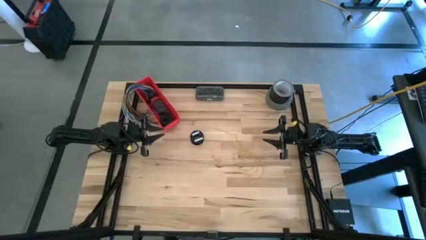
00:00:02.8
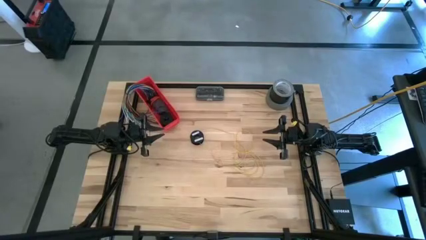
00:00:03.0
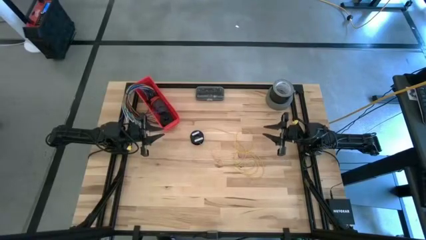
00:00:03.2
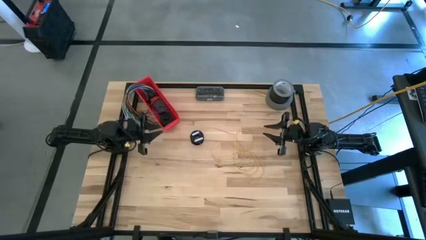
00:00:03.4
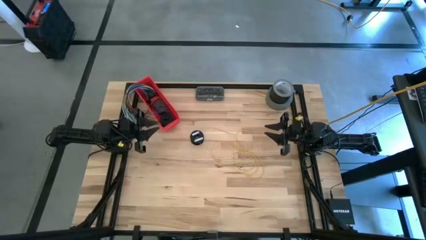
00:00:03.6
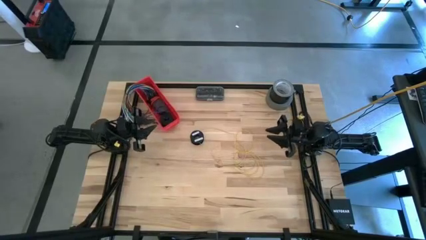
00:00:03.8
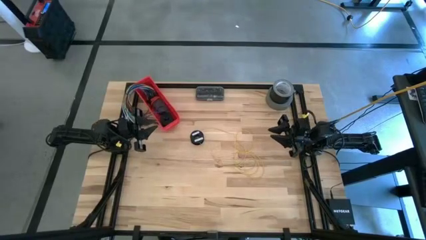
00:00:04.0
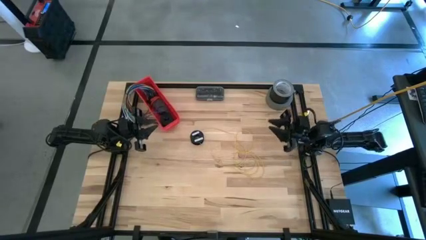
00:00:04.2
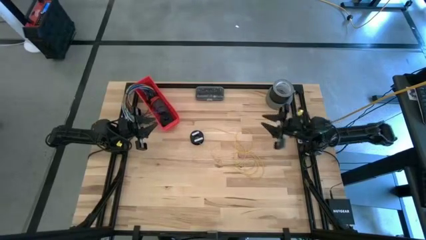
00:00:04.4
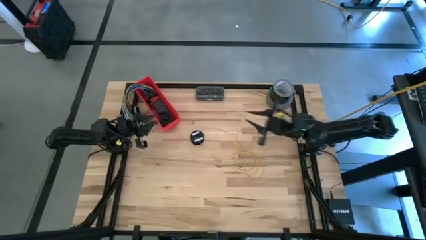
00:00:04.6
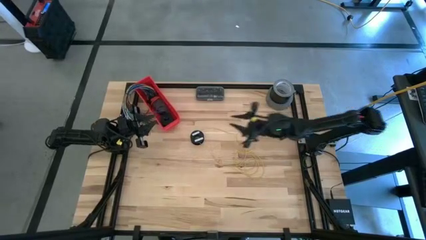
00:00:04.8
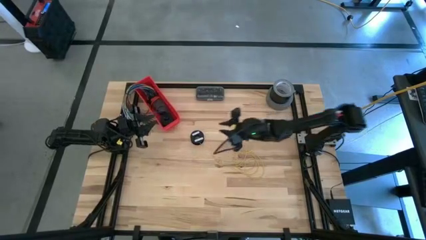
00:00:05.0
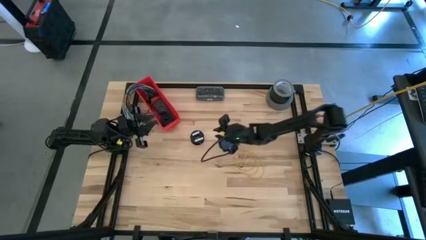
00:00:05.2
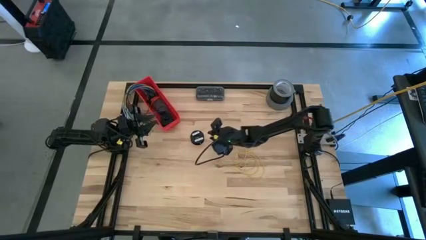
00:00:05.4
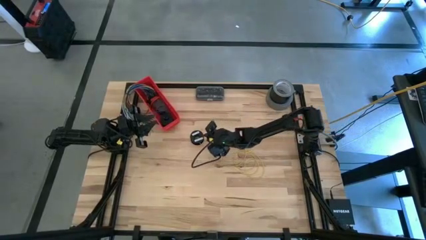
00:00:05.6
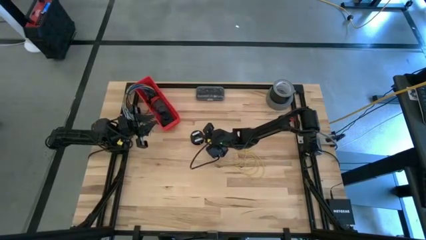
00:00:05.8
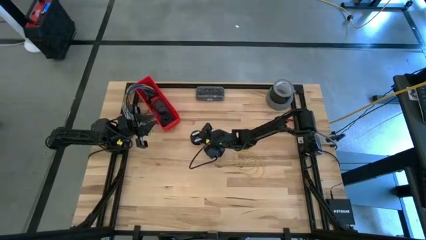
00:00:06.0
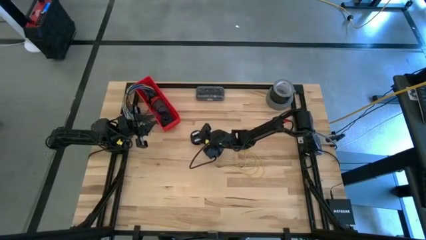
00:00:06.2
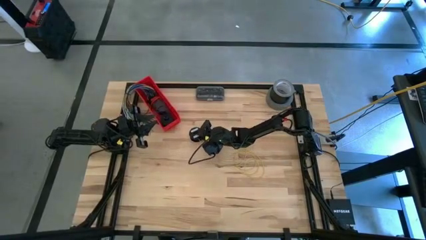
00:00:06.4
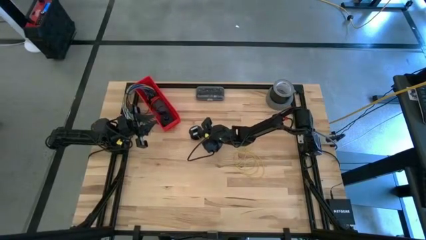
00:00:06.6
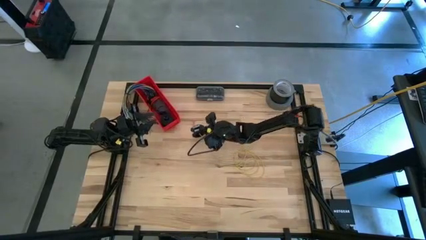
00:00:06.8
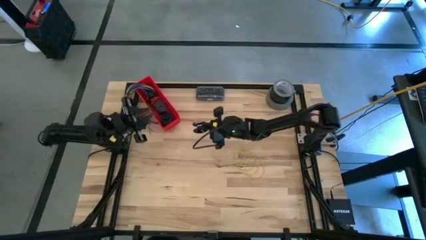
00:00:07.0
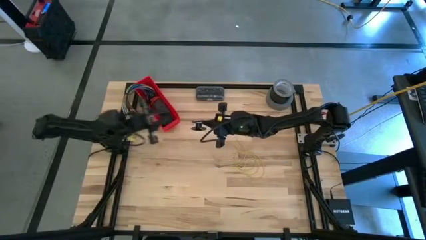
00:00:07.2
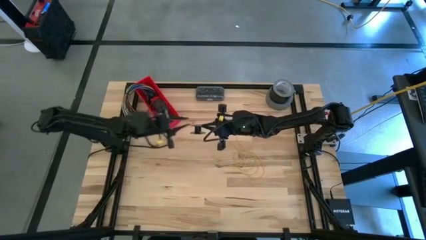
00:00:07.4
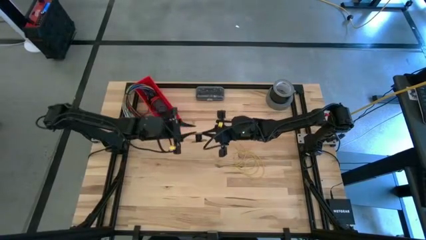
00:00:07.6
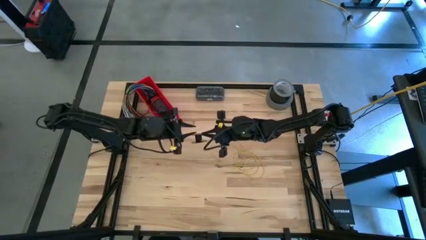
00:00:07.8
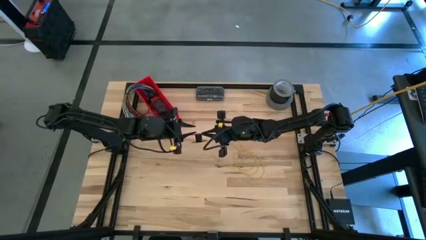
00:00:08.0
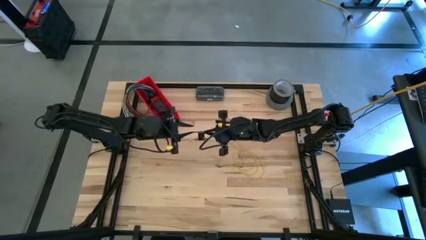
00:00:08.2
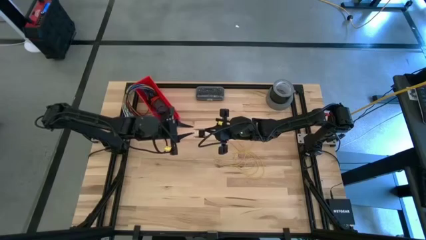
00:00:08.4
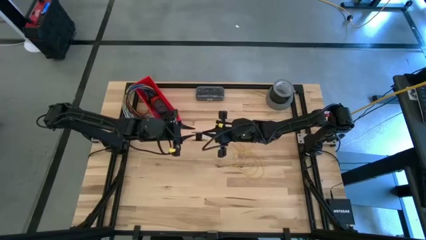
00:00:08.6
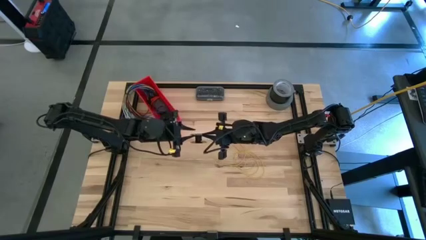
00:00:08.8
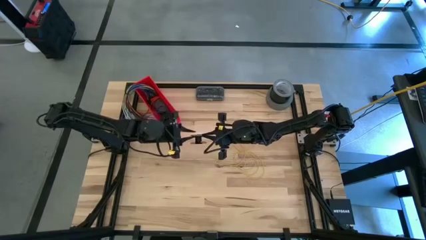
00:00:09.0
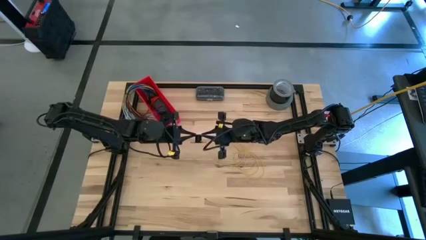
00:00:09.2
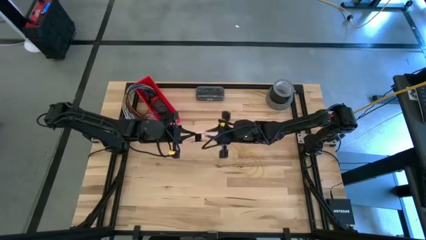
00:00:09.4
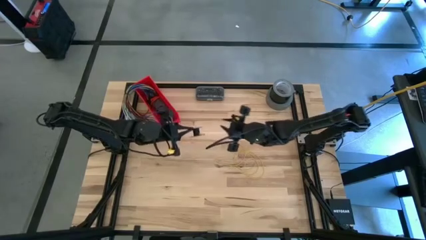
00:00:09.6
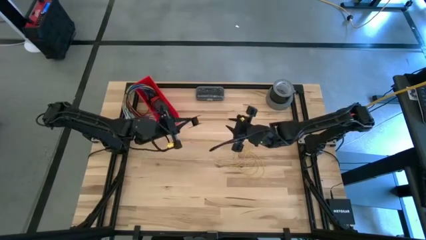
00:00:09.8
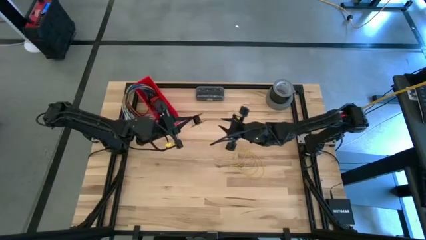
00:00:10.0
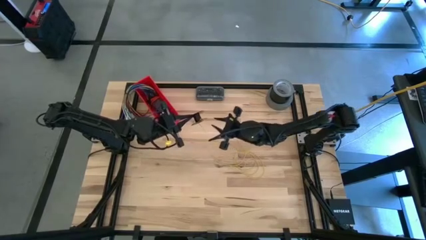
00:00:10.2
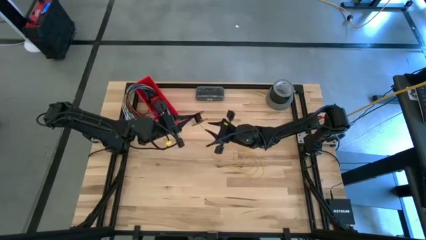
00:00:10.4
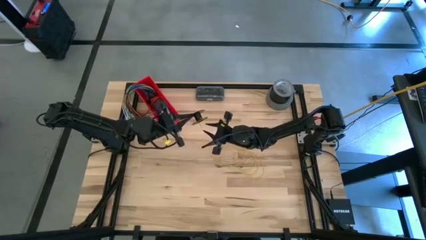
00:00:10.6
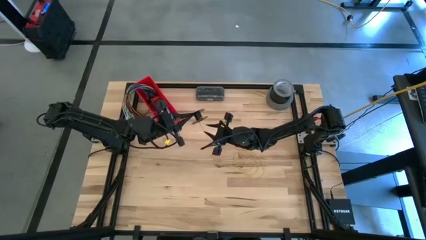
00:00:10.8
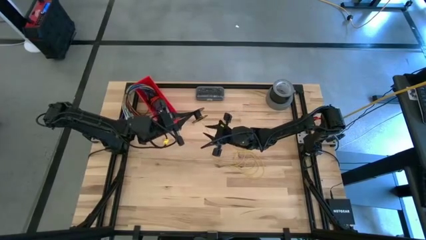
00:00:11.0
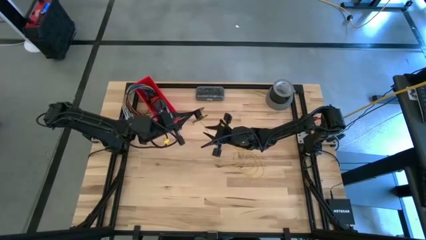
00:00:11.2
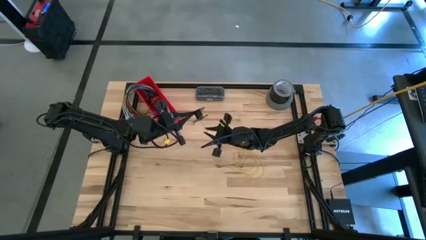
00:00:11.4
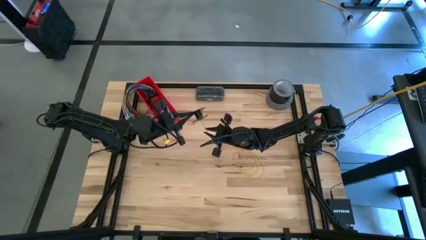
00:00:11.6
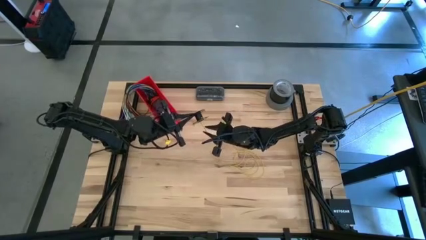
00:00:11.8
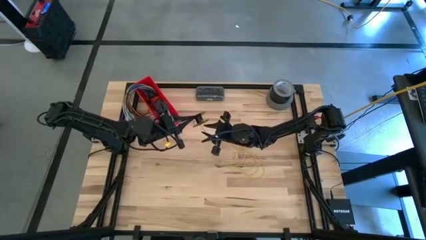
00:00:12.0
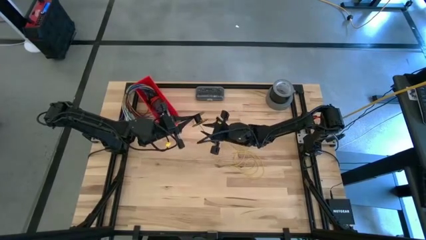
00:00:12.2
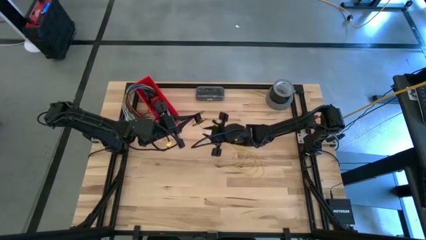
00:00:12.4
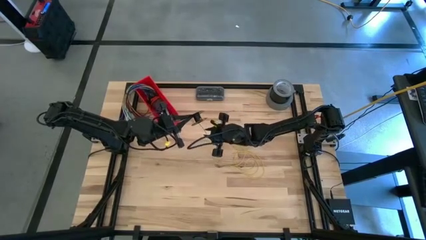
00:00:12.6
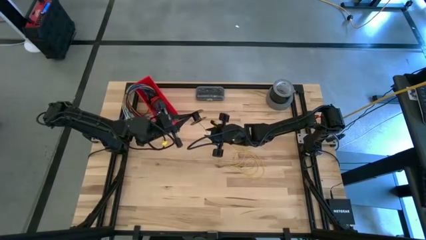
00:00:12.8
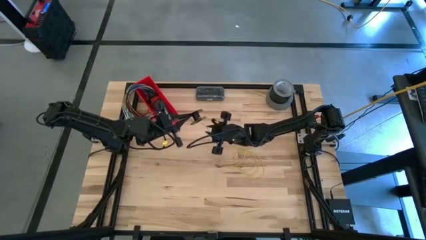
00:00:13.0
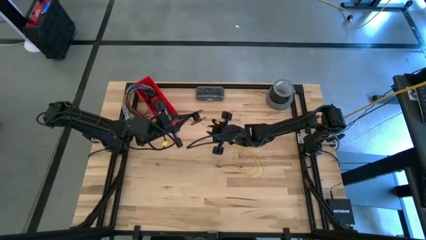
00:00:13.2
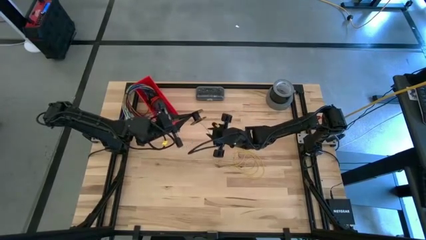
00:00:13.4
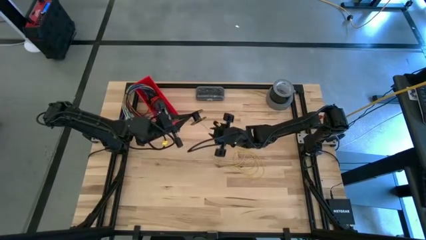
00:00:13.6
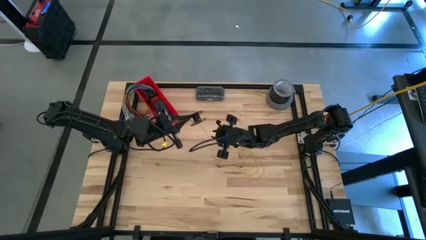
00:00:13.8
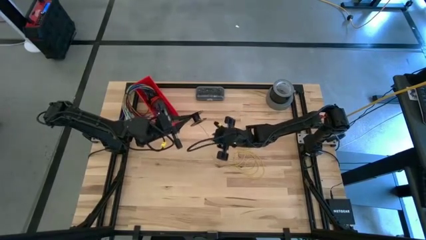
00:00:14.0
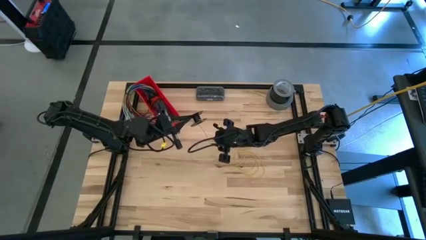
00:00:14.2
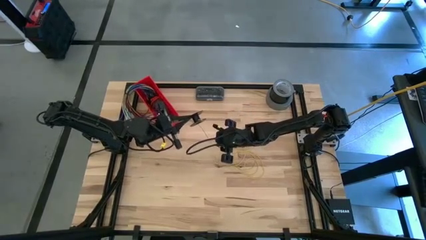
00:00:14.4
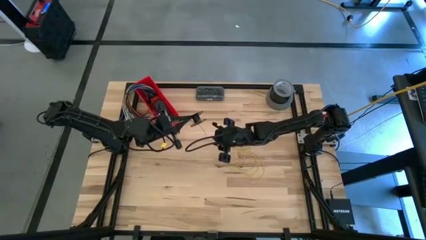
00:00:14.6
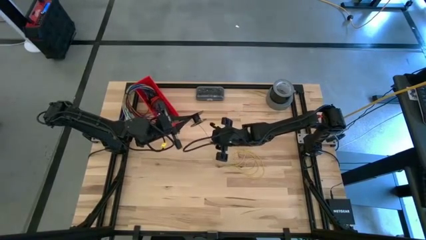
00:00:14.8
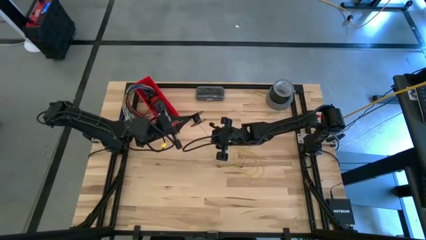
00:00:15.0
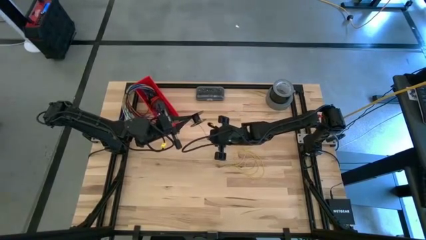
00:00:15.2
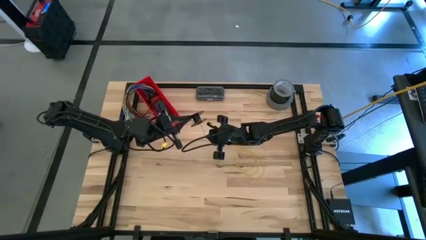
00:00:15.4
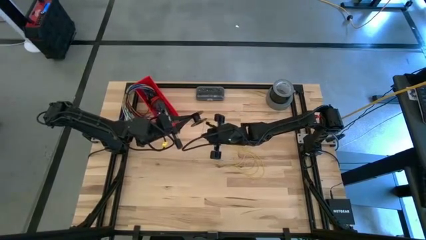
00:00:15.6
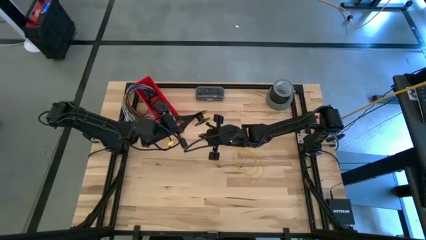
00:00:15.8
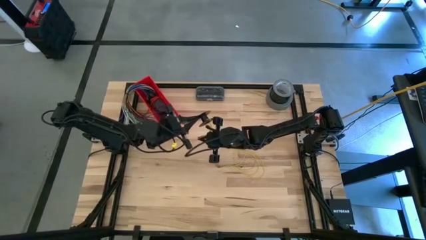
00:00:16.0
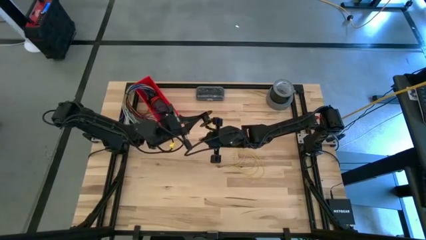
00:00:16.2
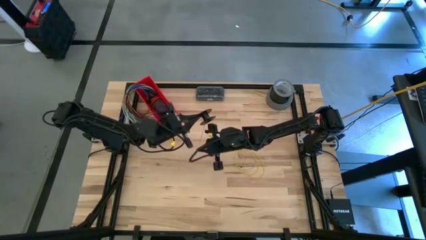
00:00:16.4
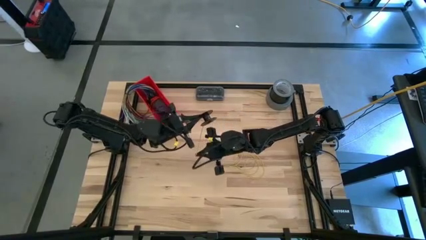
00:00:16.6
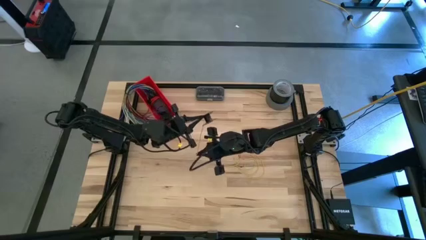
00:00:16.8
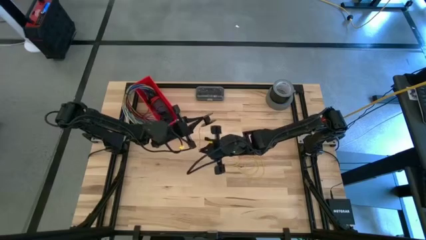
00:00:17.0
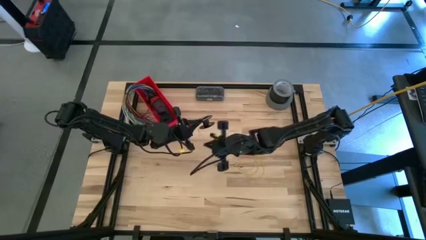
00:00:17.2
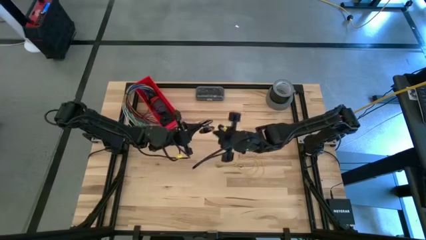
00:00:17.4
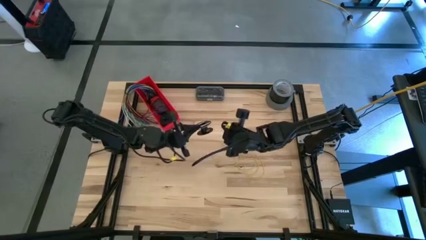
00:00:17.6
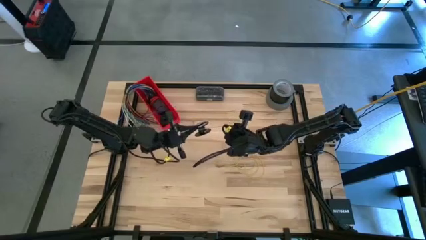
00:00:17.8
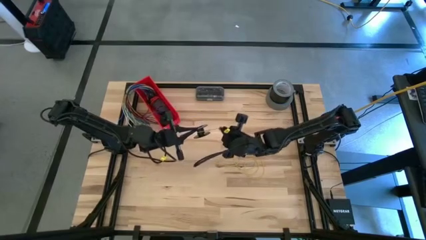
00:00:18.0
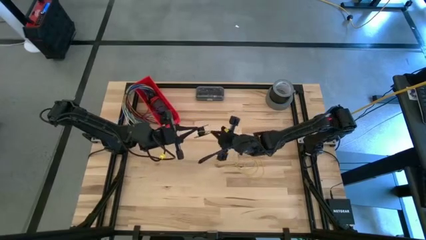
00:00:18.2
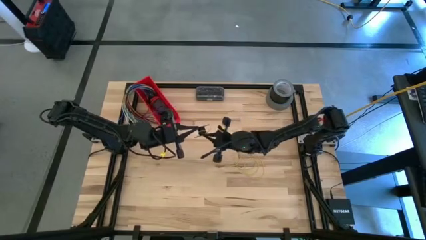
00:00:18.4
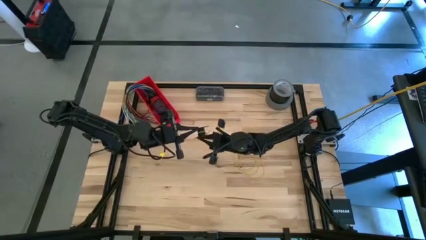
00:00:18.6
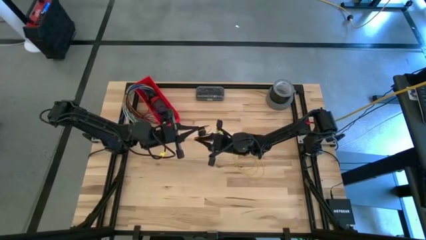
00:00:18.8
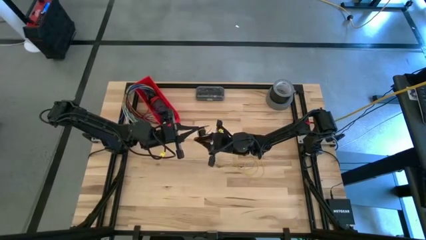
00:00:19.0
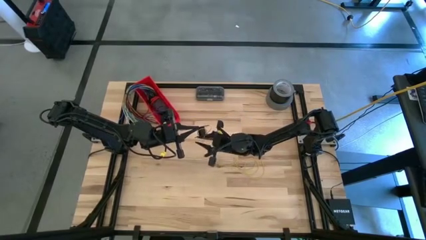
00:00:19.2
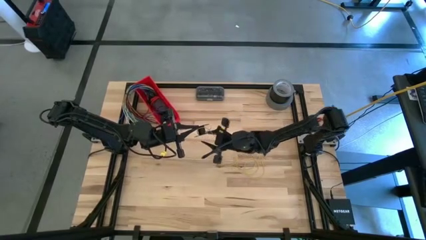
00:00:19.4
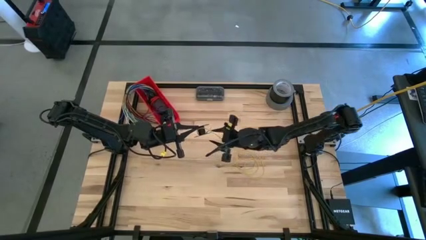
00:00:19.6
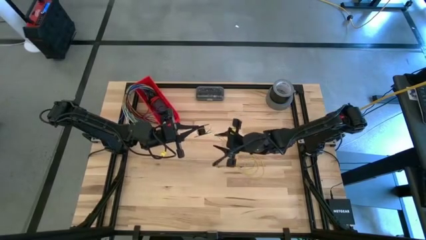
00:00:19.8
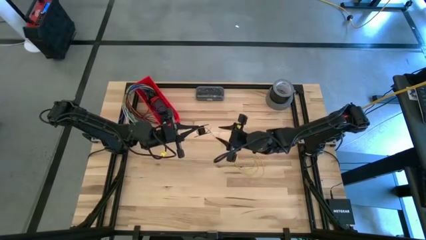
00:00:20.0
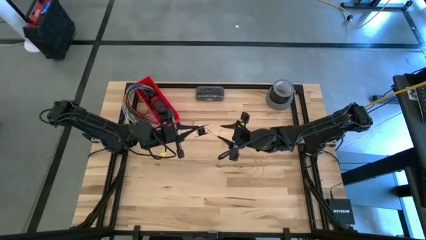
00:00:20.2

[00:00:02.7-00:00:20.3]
Task: Coil cords
Coil the yellow wire on the spool
